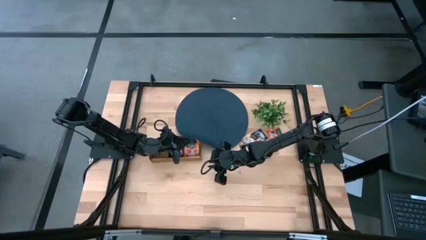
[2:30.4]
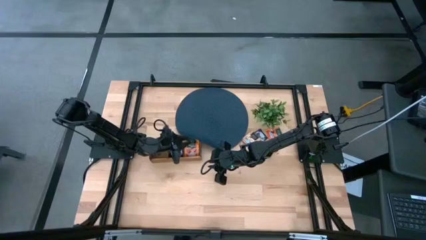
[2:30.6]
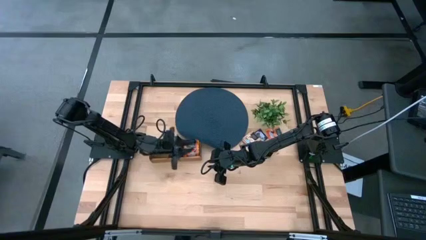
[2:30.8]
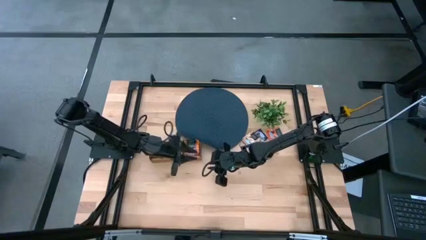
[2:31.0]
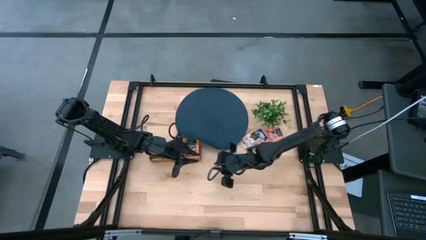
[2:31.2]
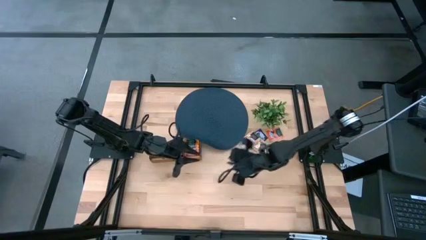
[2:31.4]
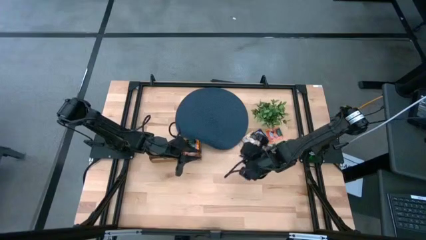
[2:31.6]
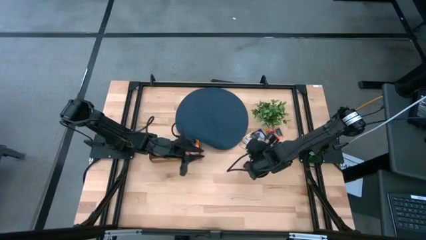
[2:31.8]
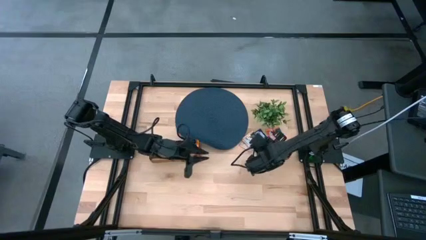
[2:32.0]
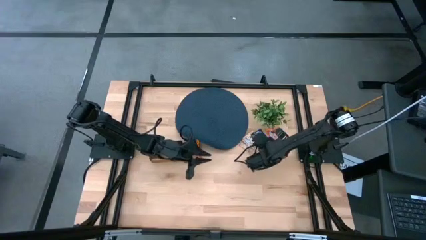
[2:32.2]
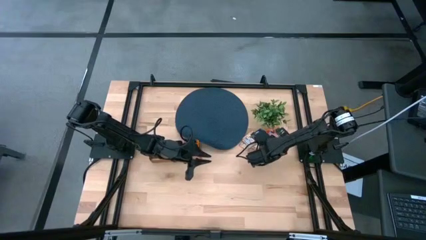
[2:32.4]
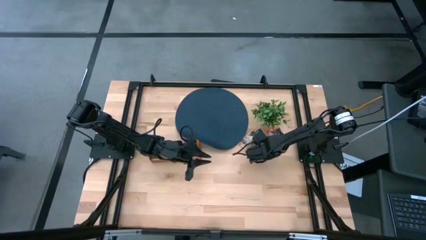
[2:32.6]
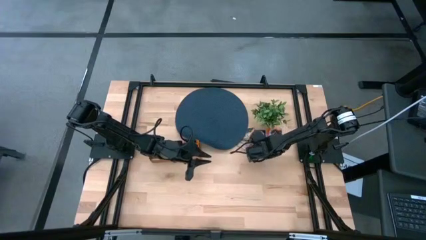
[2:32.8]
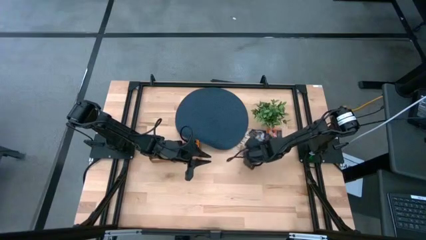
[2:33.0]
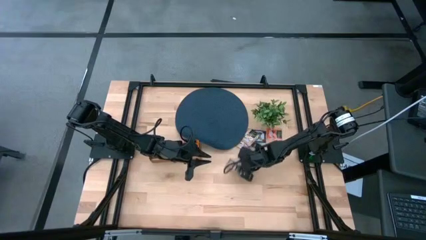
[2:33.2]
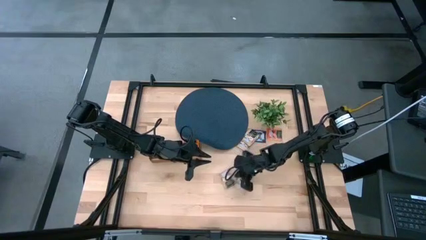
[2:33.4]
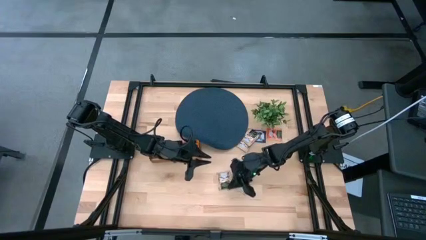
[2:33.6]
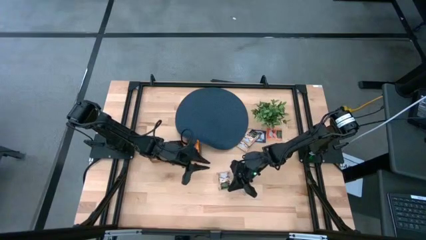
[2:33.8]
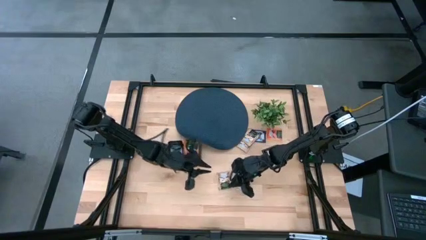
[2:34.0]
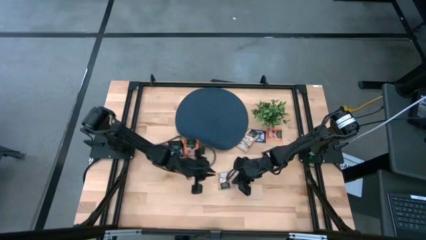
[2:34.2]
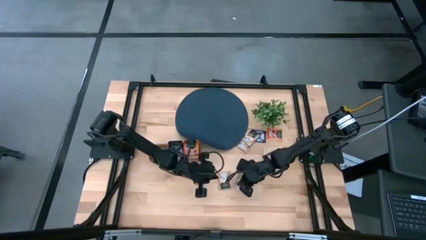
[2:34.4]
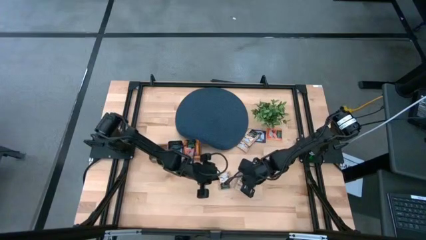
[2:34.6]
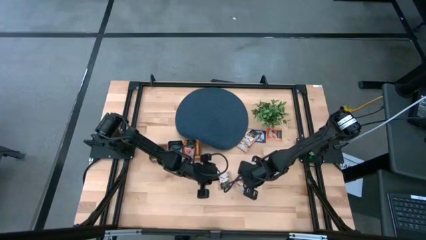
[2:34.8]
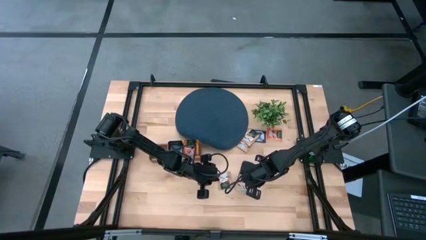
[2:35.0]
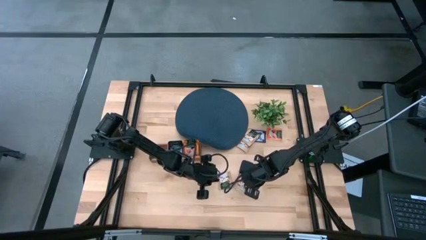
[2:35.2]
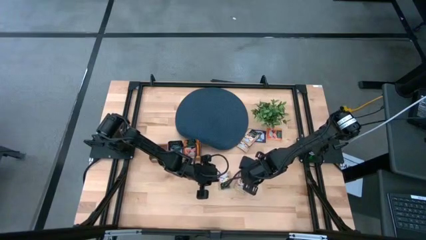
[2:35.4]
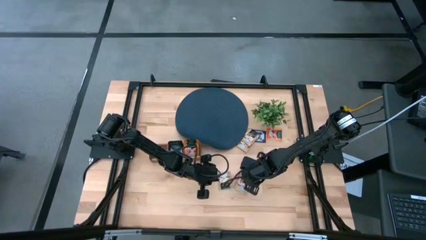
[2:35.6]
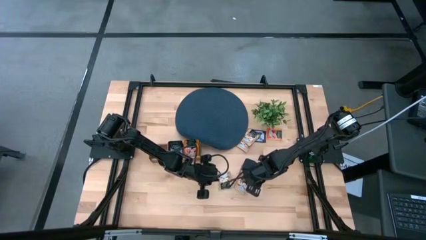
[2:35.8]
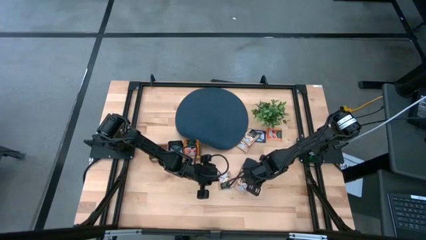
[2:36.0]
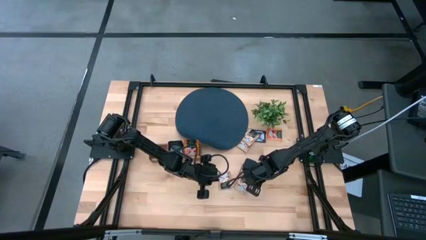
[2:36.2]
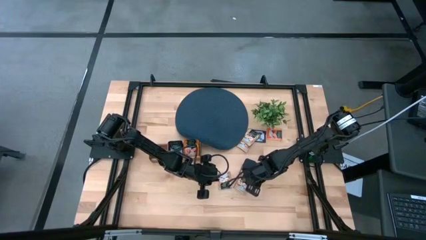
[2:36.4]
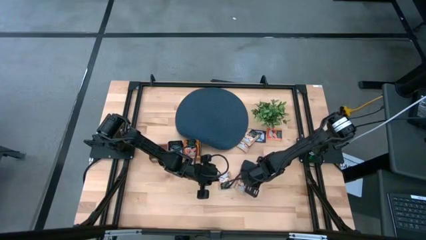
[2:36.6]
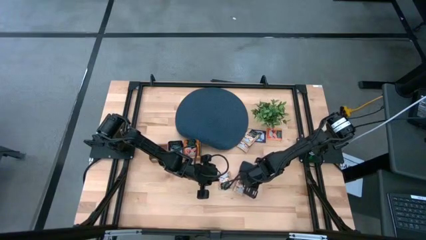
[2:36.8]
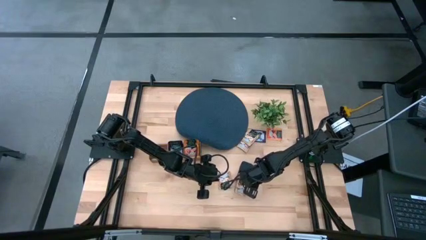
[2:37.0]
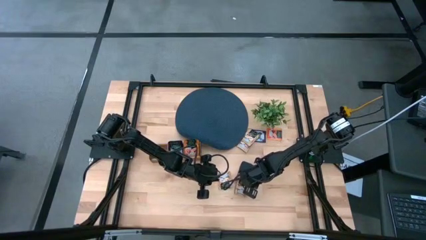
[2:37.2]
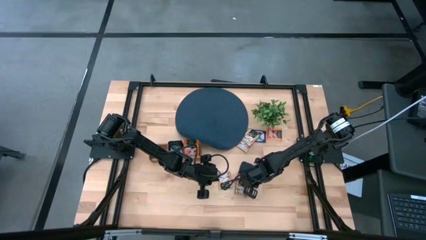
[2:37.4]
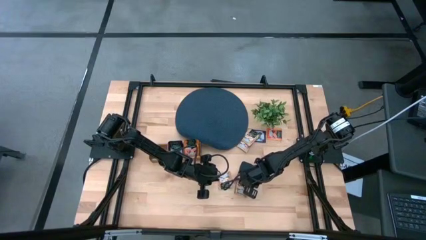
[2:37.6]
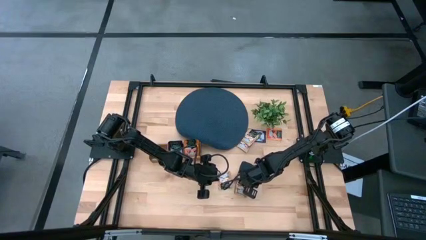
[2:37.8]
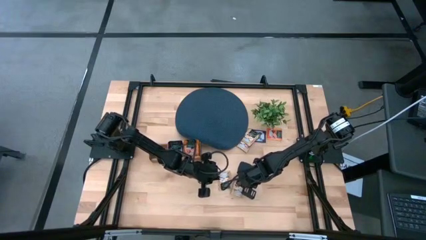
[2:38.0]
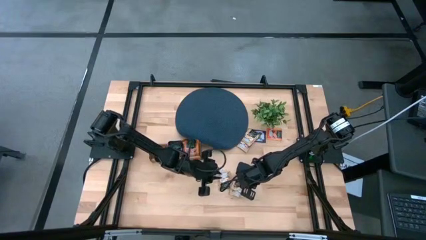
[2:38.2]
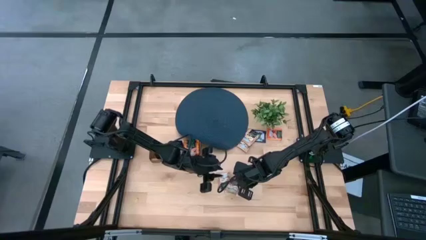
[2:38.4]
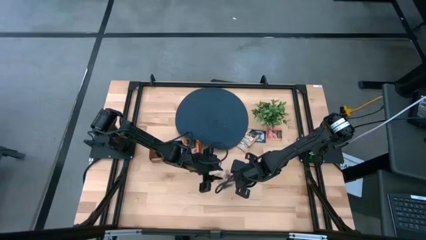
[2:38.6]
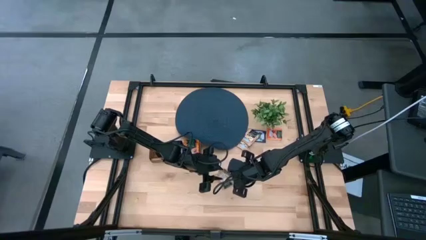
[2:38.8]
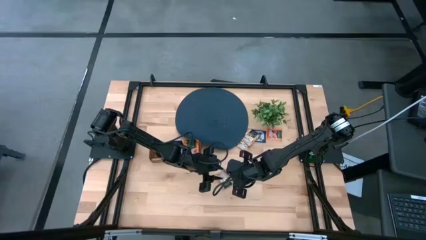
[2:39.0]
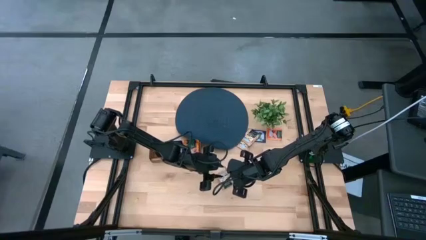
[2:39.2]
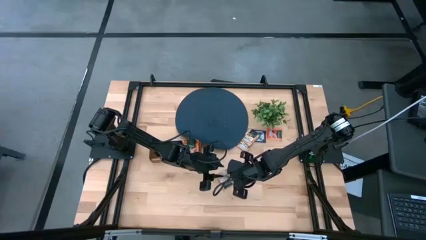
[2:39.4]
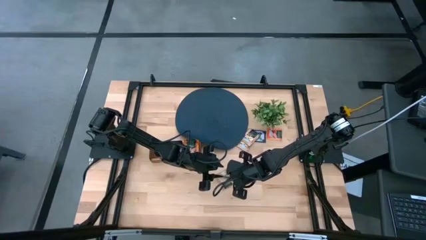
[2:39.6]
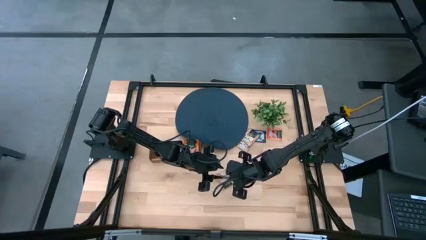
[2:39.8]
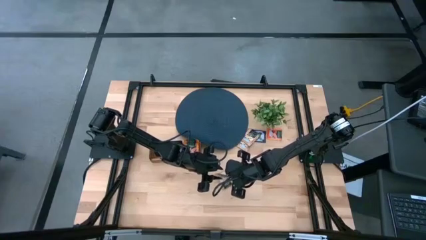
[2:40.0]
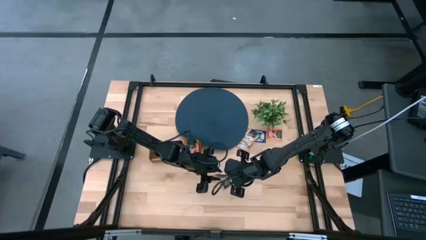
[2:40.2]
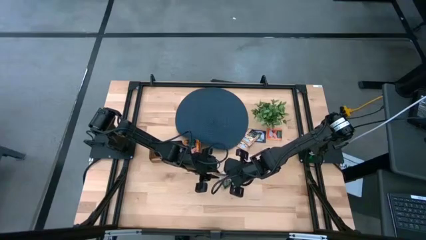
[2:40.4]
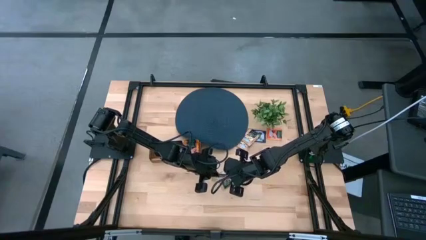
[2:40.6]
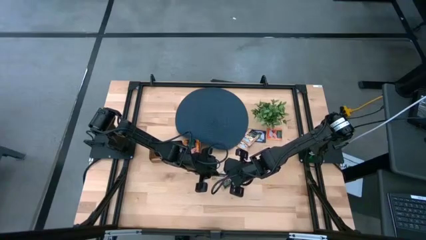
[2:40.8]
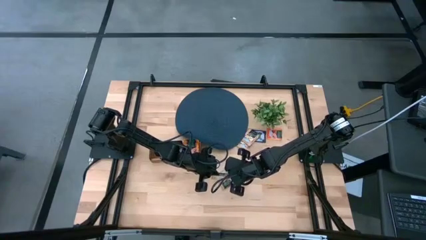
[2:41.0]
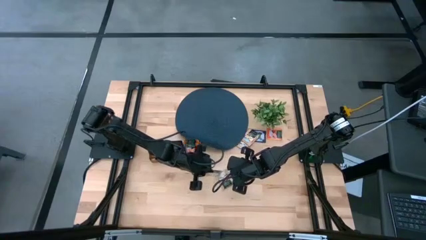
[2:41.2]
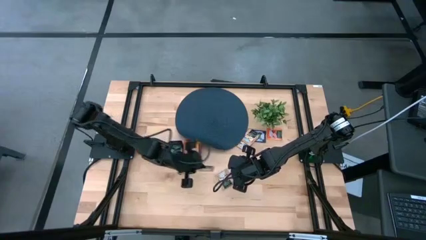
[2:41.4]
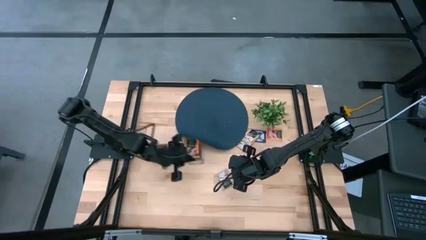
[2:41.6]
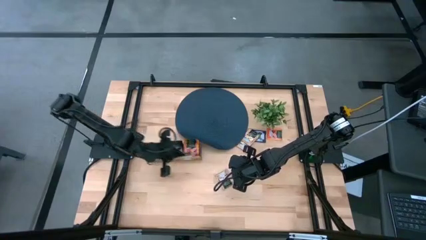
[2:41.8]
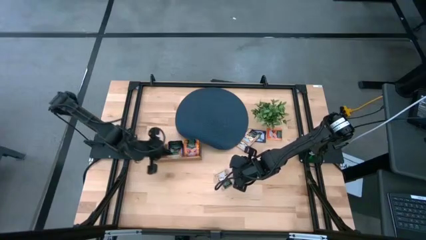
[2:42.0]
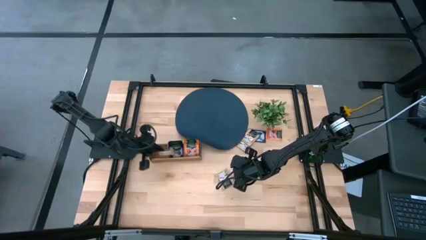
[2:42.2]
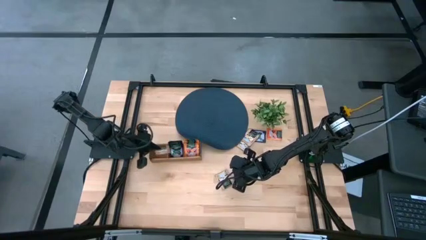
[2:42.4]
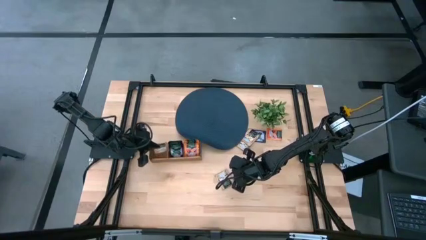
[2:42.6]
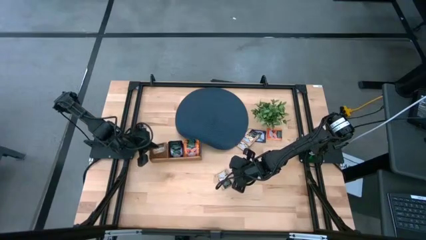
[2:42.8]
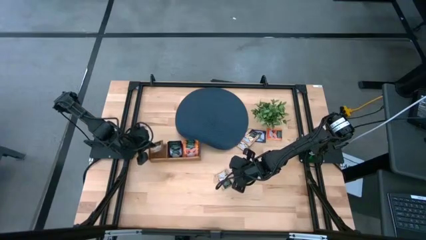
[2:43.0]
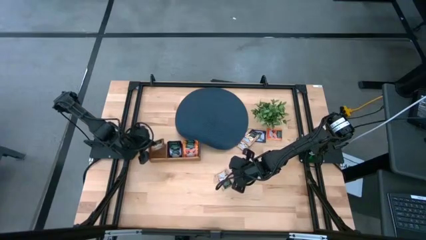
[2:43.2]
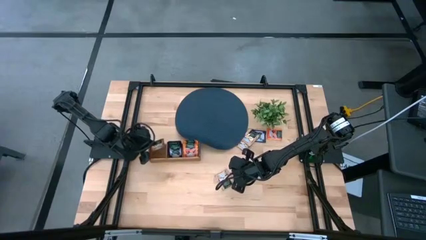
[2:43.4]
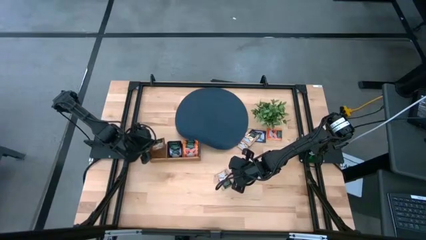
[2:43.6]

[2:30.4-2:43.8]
Task: Pick & Place Tea
Put the brown tea bag into the left section of the wooden organizer

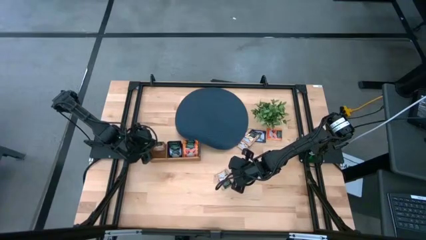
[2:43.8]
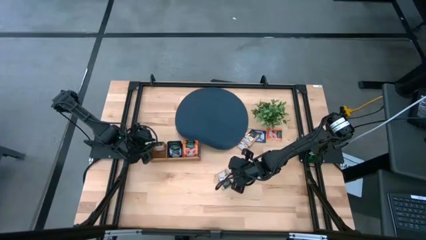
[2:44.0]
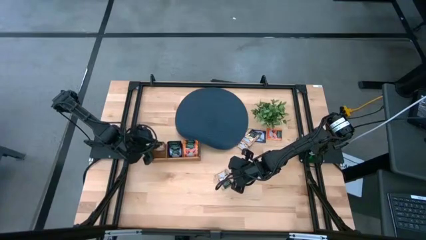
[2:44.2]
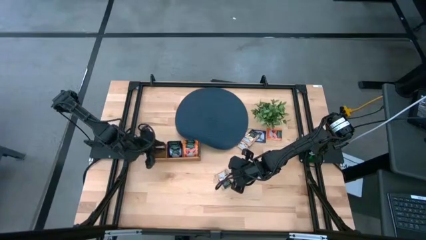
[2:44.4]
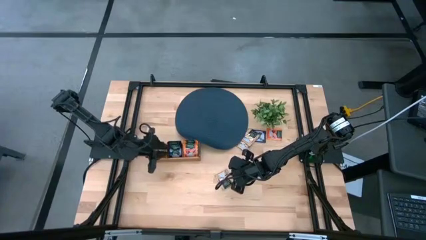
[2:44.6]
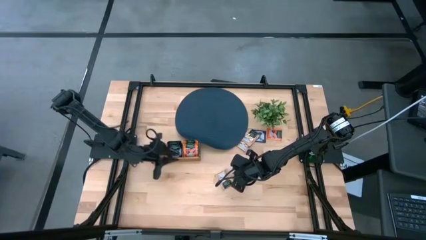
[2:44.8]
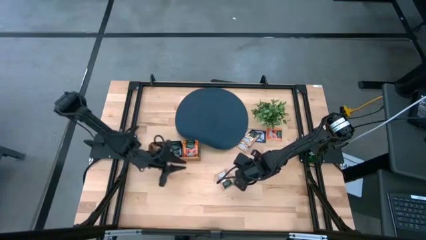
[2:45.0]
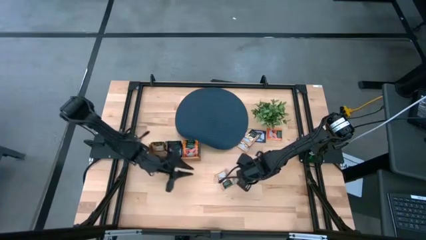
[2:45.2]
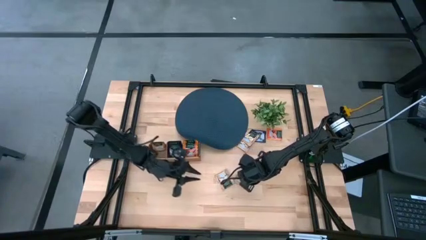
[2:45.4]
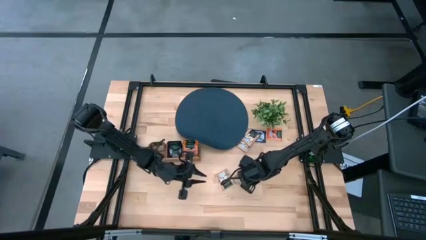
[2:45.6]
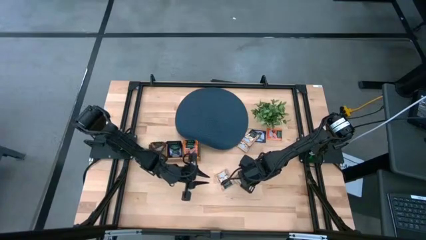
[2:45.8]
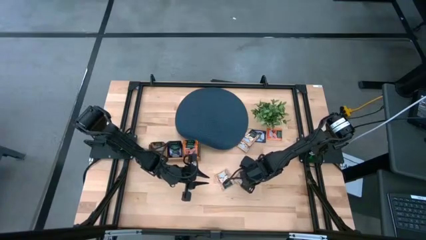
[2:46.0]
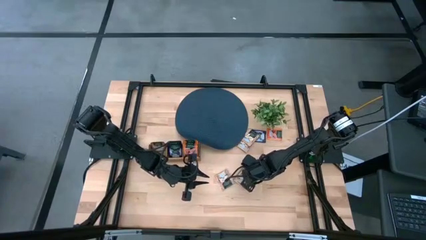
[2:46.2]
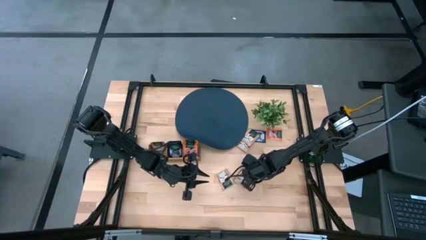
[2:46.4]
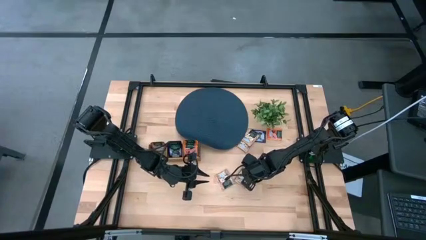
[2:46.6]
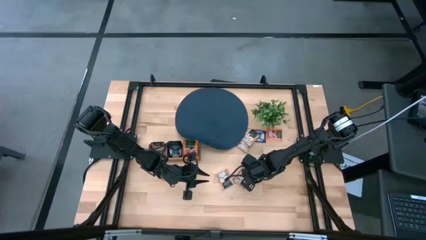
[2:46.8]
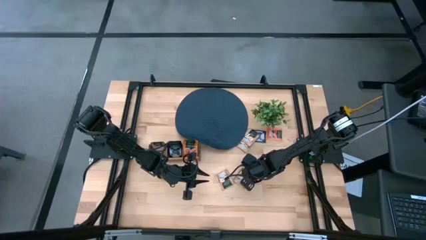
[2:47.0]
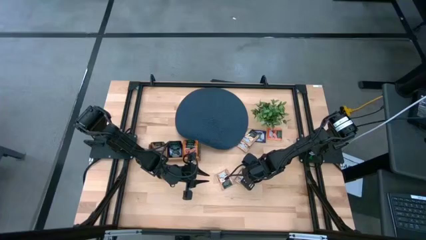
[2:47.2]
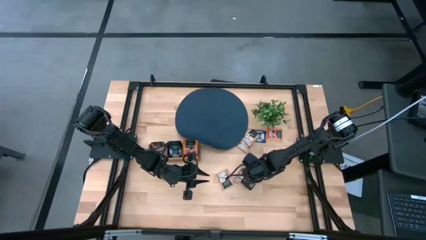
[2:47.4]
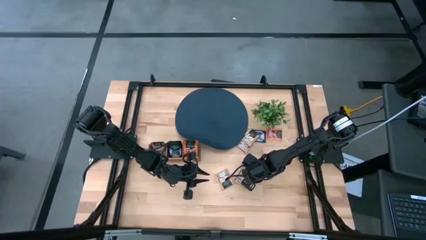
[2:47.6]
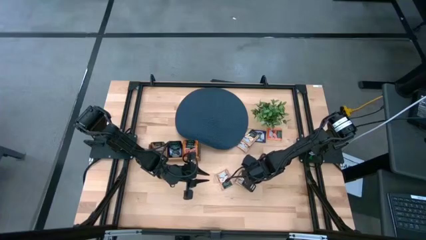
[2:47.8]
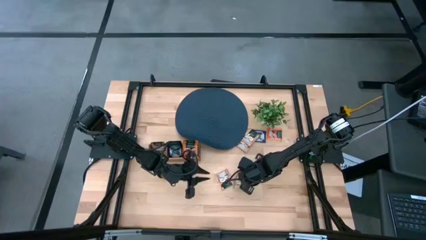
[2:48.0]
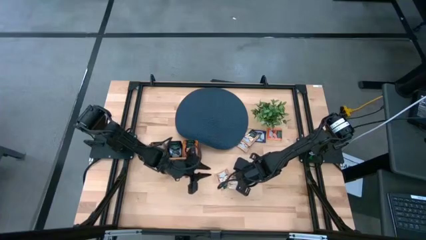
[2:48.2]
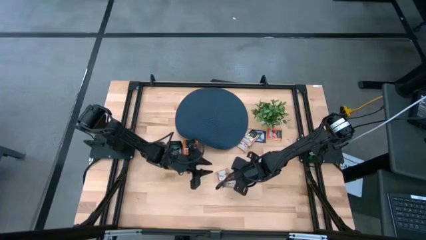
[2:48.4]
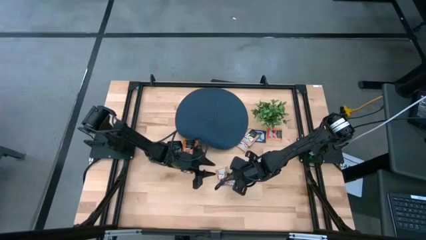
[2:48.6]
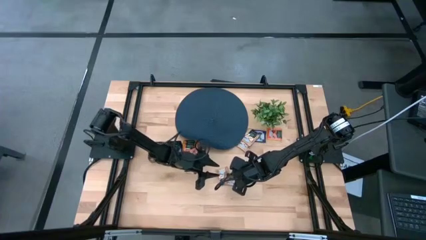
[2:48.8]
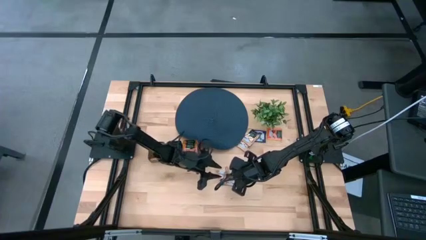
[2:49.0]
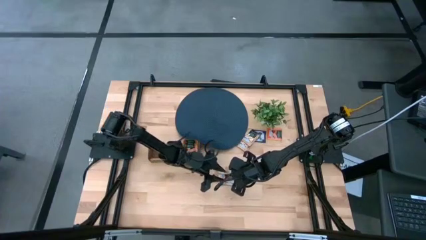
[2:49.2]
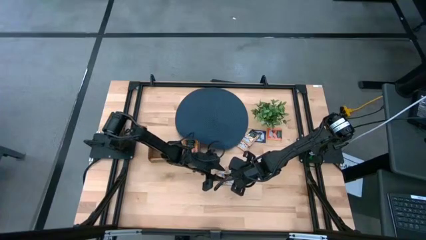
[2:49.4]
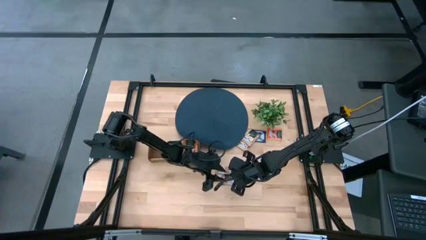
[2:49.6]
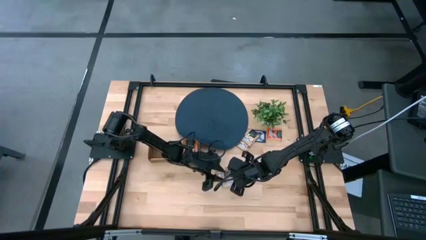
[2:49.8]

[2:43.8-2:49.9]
Put the brown tea bag into the left section of the wooden organizer
